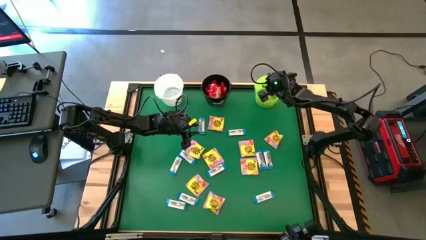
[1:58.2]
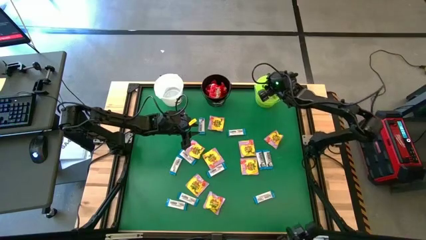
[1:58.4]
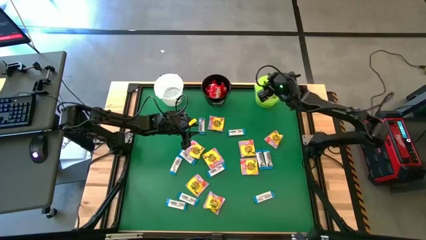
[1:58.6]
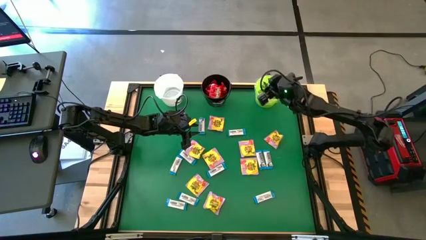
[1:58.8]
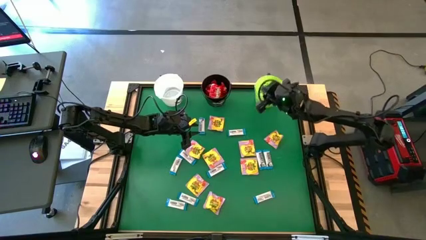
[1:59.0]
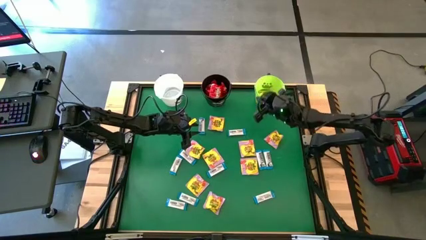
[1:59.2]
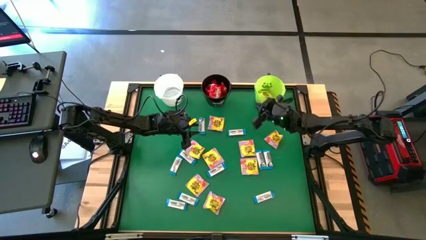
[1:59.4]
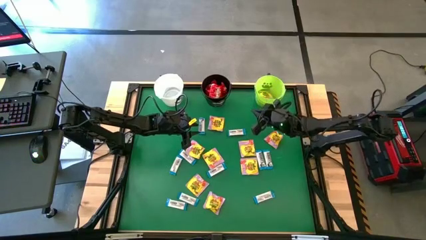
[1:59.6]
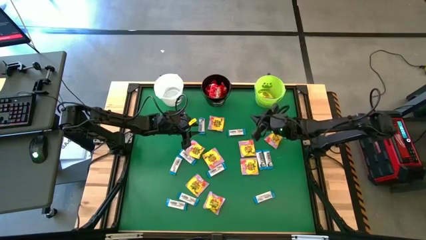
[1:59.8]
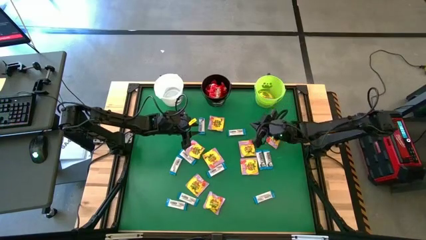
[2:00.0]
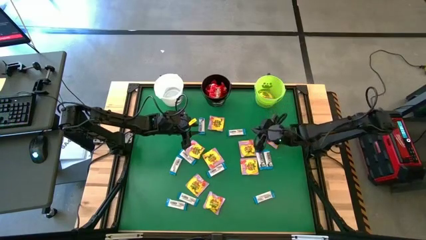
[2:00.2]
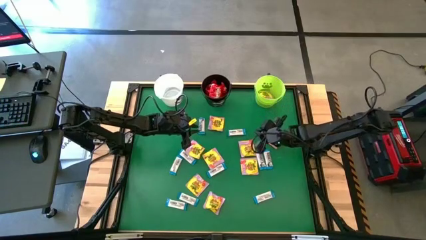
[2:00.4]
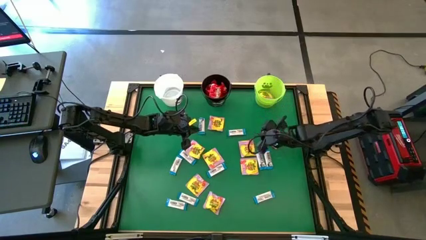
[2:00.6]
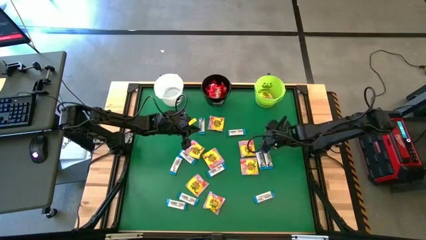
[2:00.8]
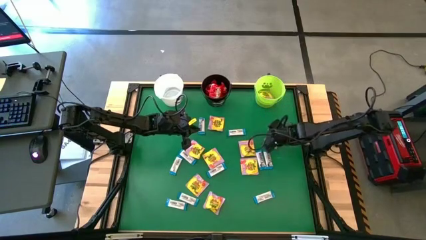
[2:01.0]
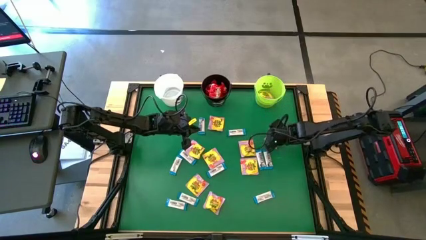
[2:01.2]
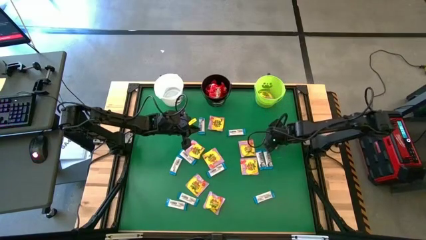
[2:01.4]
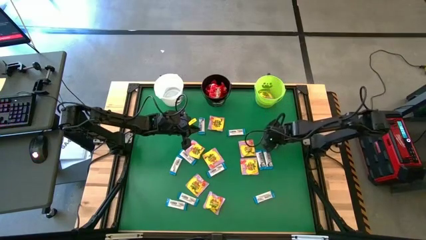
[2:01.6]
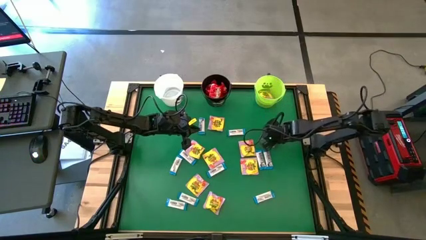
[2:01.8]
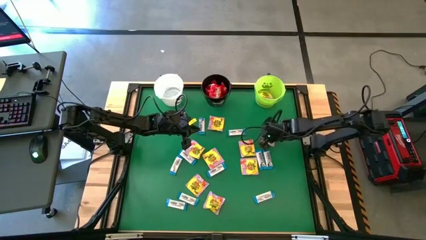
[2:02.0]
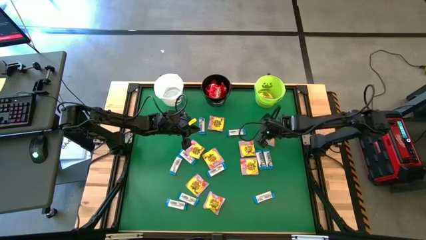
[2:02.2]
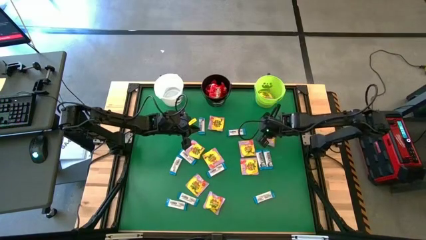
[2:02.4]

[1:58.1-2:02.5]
Task: Sort candy by brand, put in halloween buckets
Put the yellow candy into the green bucket

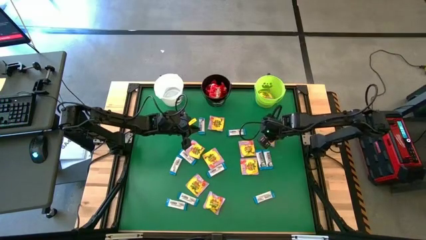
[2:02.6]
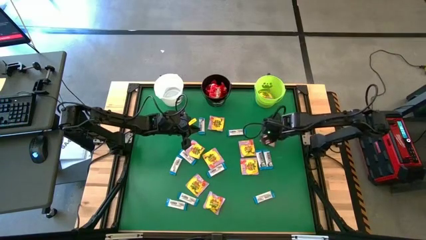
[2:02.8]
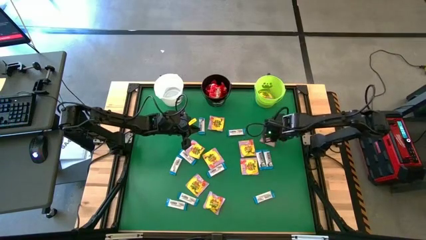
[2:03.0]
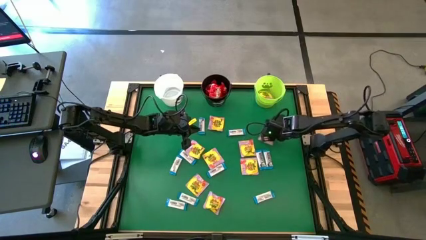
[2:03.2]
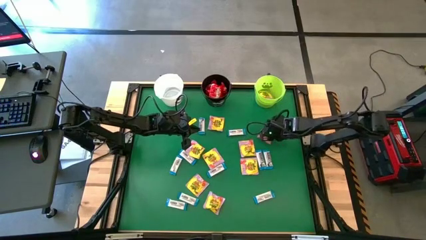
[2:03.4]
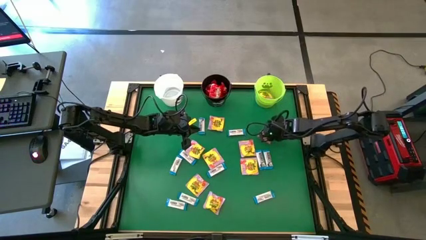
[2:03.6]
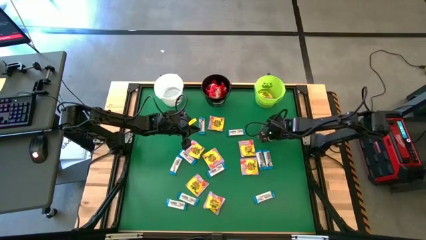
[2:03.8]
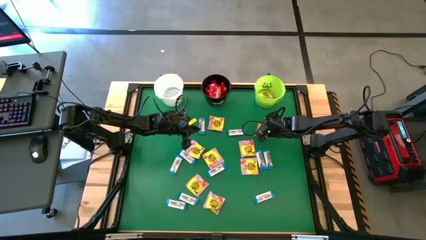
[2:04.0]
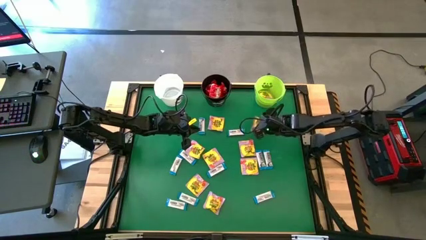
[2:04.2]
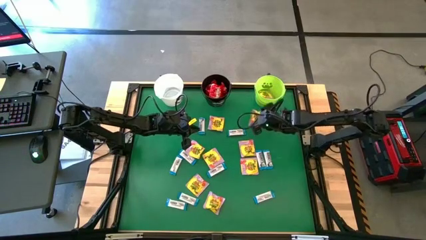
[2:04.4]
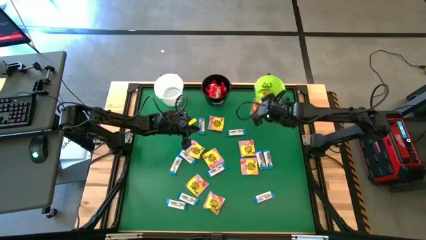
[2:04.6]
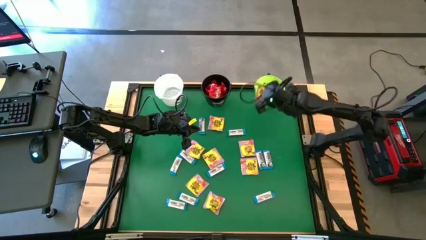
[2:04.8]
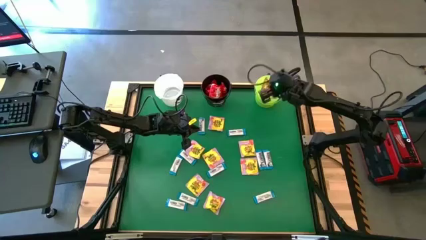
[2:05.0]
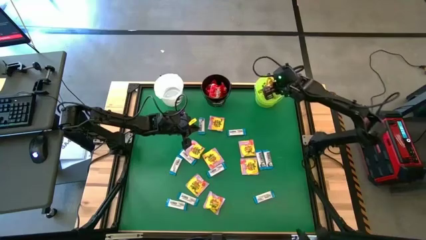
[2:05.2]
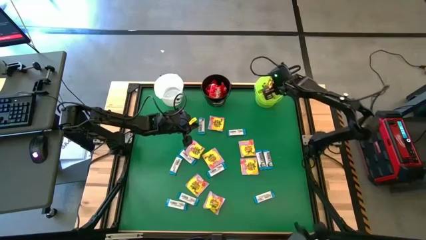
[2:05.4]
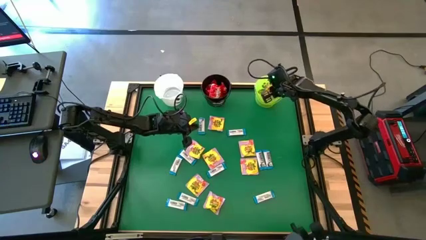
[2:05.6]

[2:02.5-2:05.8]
Put the yellow candy into the green bucket

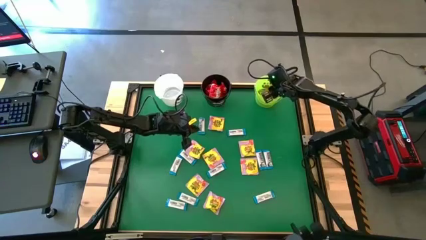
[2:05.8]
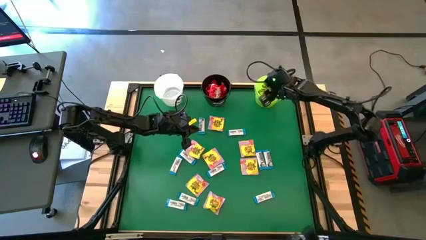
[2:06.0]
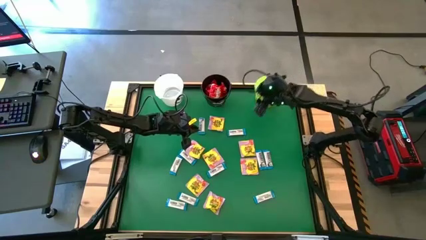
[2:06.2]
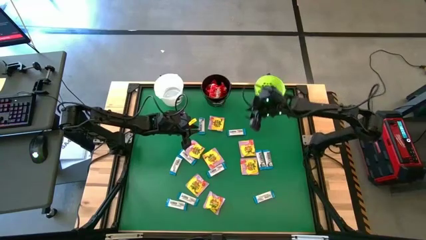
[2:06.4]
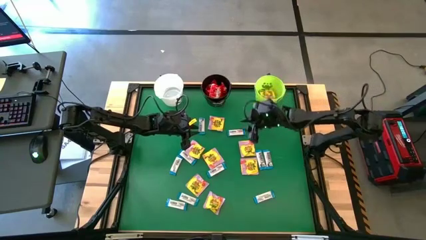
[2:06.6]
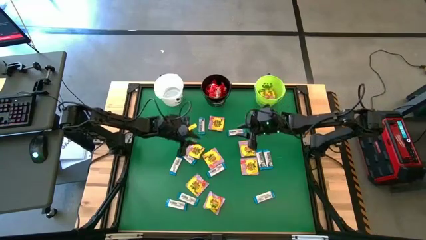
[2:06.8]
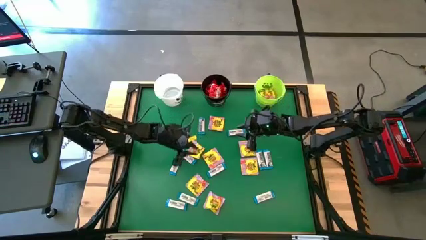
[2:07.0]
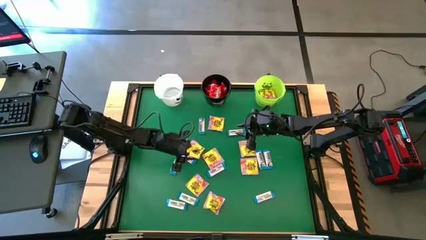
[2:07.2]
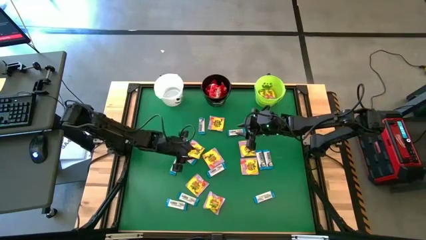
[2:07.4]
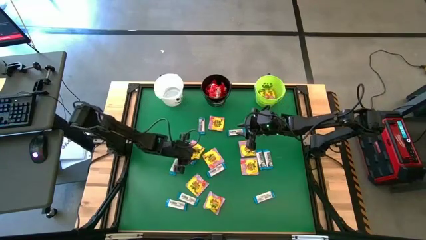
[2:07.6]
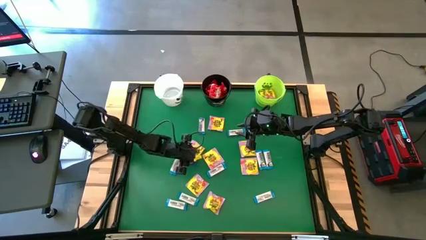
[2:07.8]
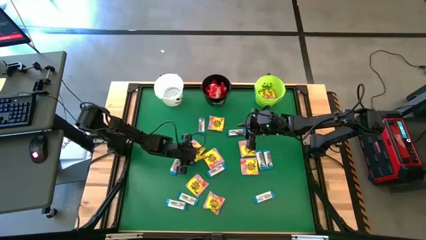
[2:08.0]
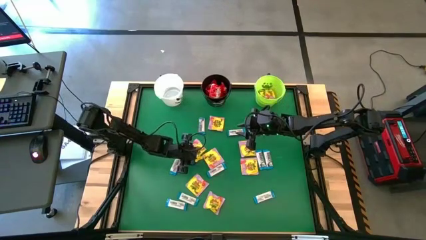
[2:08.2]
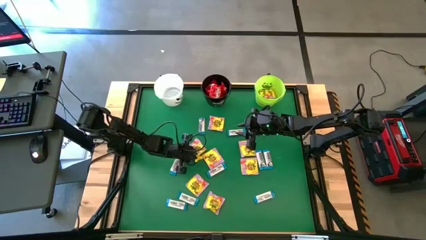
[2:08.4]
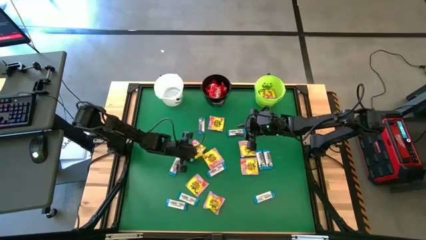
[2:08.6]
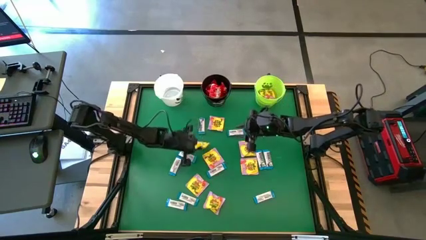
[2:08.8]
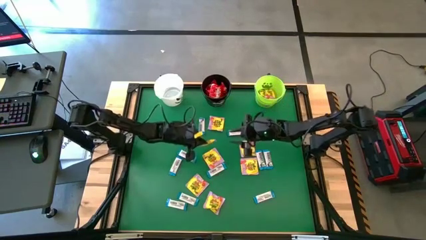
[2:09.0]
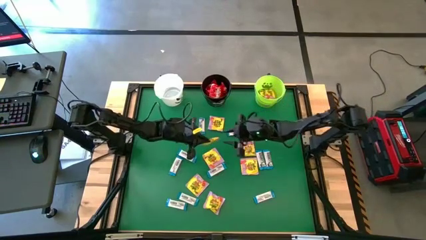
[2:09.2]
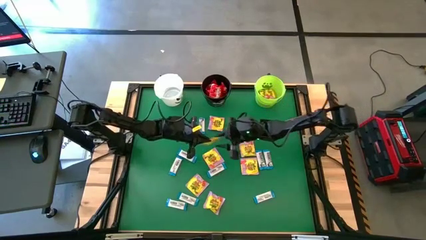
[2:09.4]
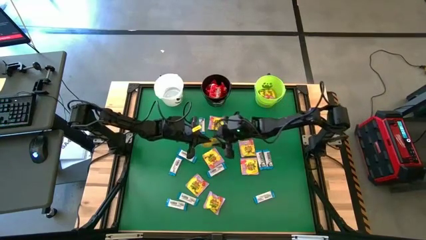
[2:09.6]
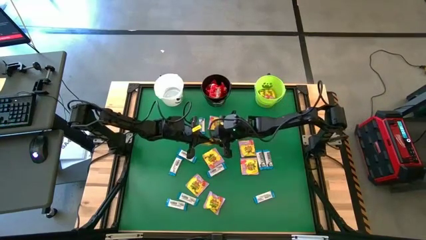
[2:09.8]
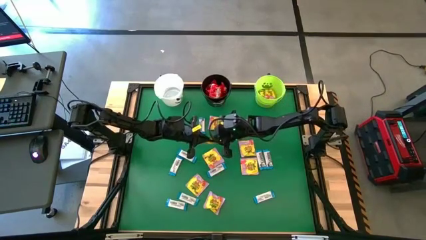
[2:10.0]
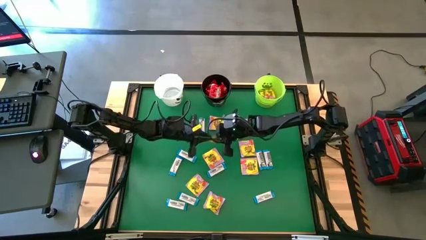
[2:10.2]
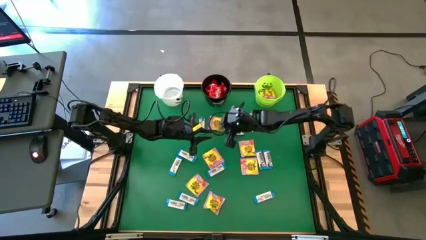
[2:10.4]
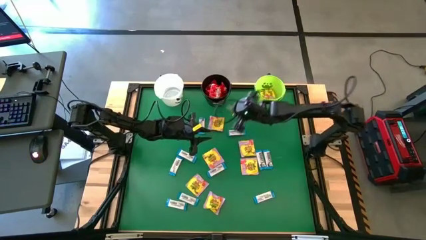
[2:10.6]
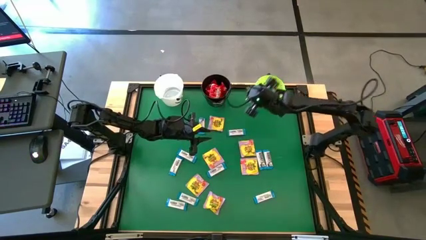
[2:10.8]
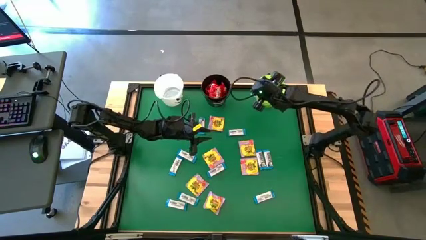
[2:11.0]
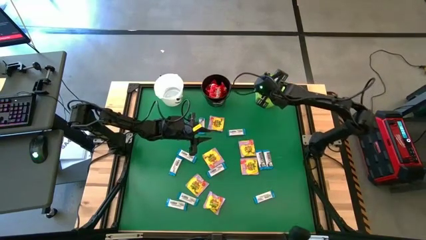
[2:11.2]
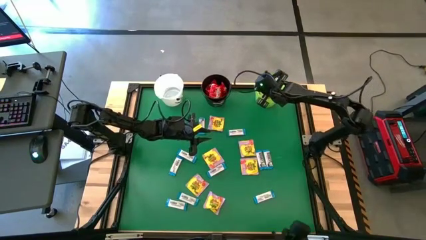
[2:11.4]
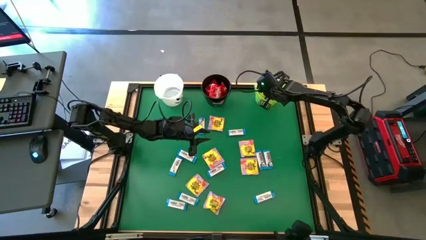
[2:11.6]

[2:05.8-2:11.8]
Put the yellow candy into the green bucket

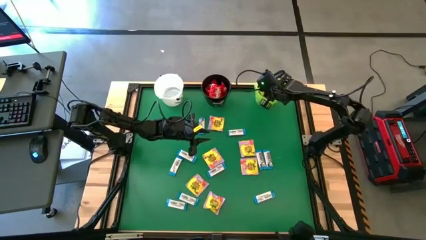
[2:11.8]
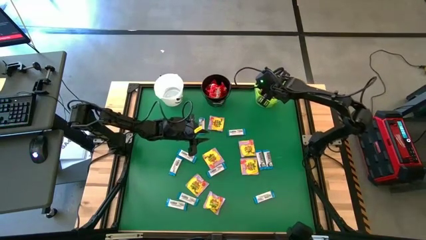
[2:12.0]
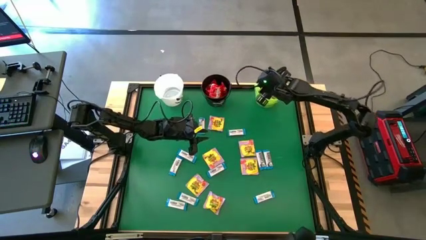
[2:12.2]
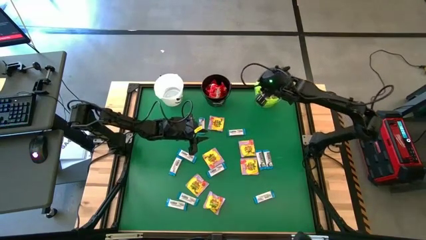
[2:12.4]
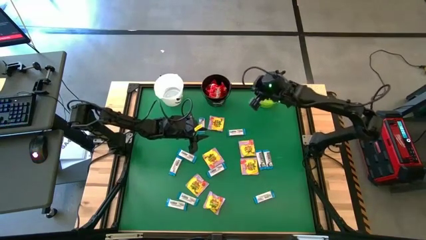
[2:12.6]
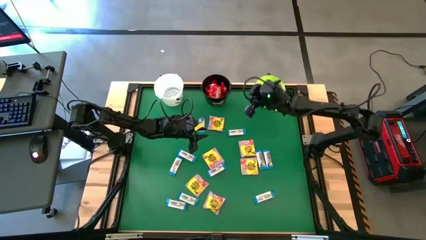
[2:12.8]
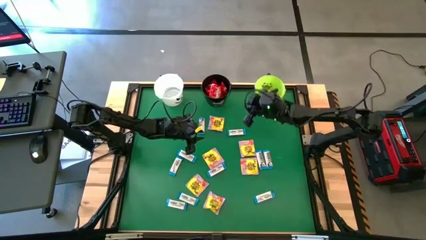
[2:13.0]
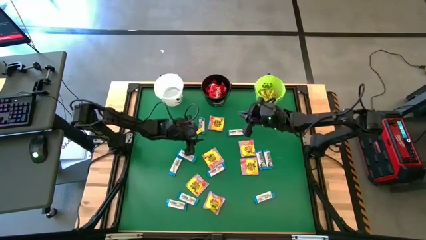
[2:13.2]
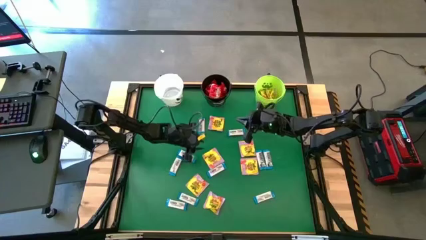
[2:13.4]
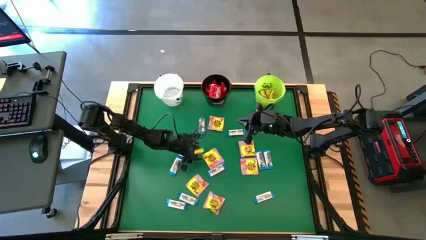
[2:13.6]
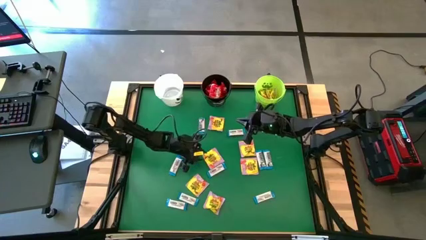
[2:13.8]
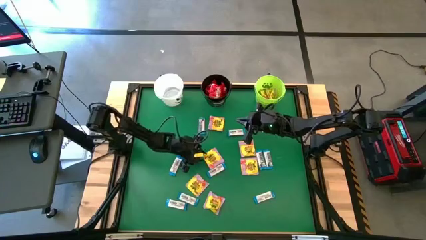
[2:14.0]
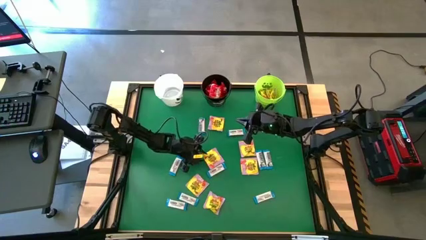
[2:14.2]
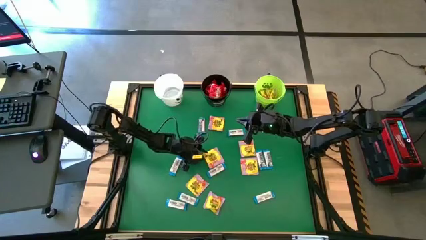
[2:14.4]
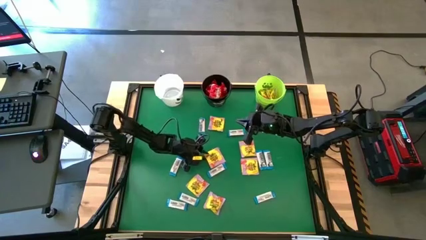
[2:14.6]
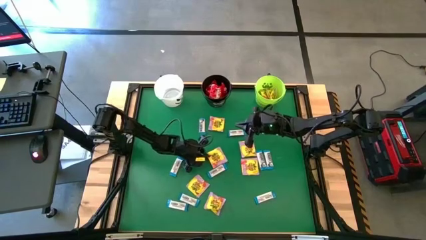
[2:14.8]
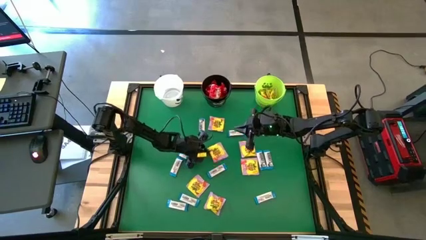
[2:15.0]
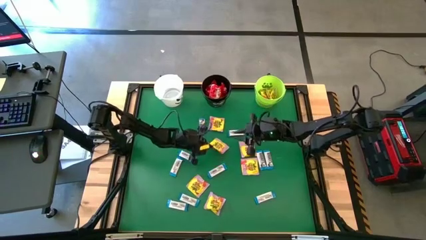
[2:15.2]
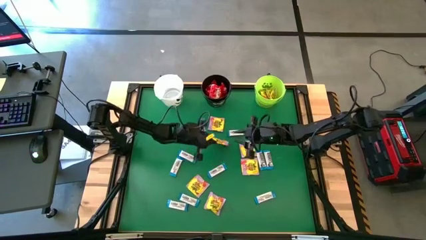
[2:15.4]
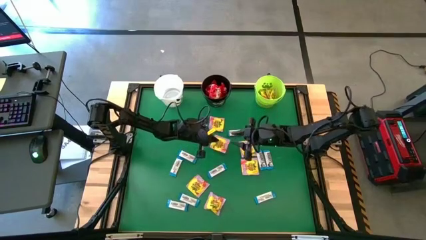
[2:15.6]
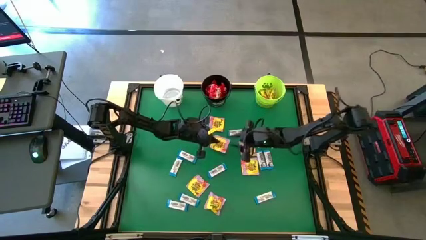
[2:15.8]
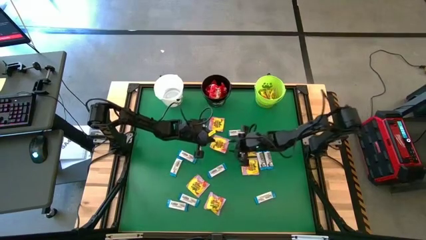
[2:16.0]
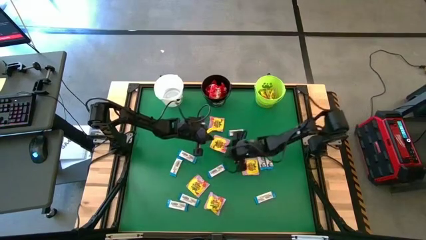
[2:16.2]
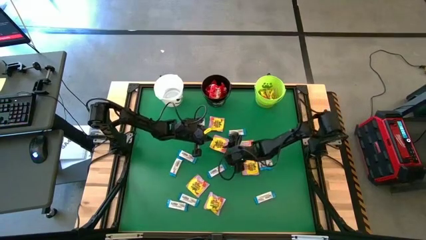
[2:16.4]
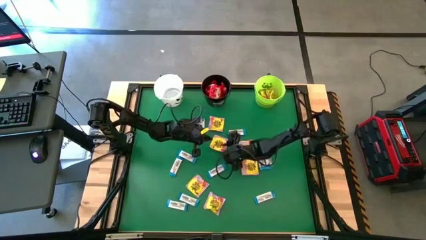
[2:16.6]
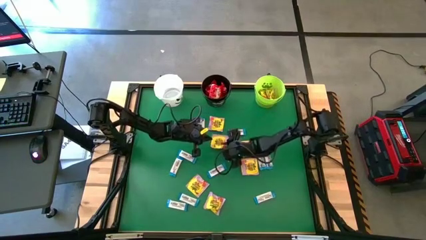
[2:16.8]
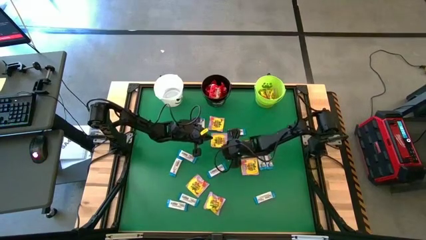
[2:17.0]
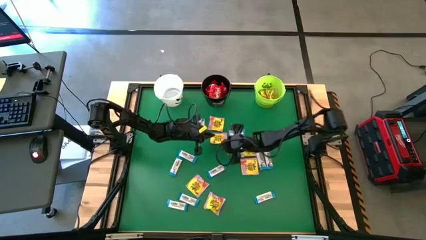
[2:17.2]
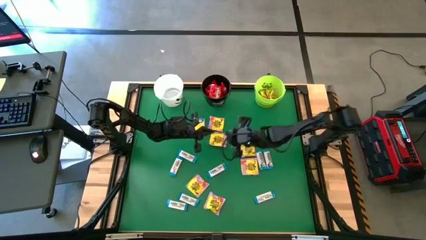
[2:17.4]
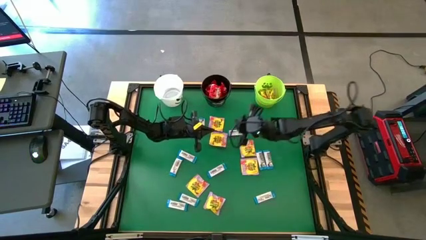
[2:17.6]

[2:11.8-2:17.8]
Put the yellow candy into the green bucket
